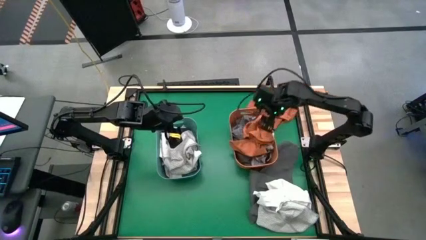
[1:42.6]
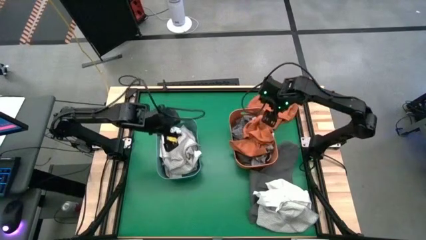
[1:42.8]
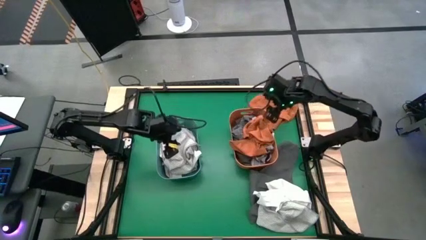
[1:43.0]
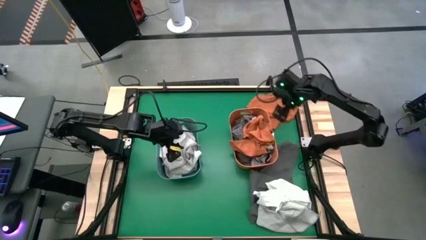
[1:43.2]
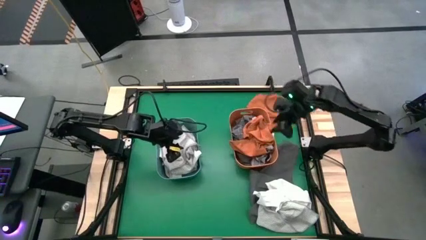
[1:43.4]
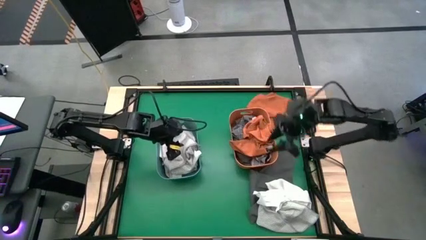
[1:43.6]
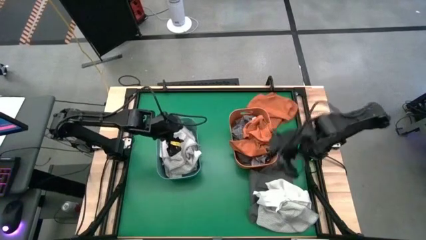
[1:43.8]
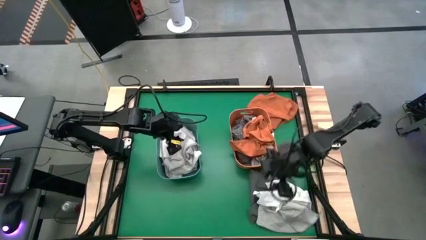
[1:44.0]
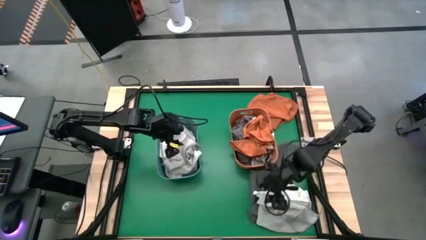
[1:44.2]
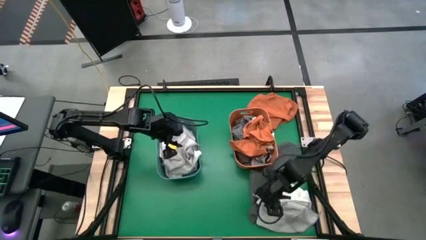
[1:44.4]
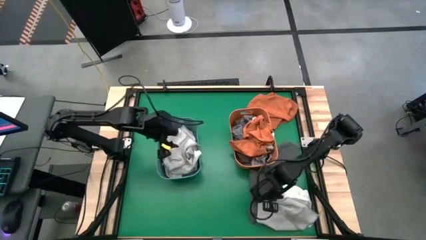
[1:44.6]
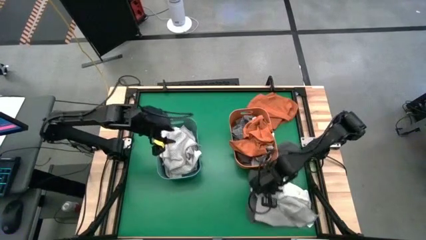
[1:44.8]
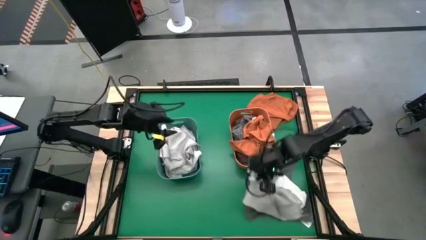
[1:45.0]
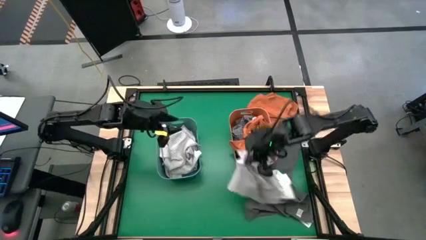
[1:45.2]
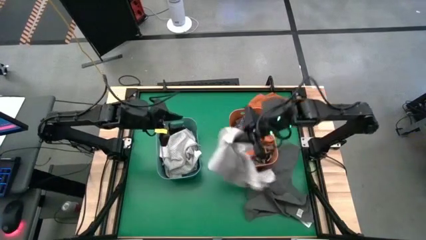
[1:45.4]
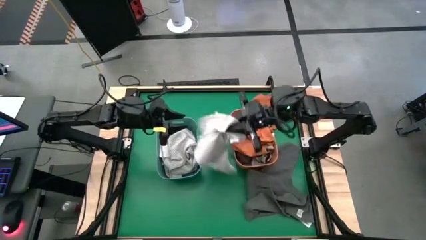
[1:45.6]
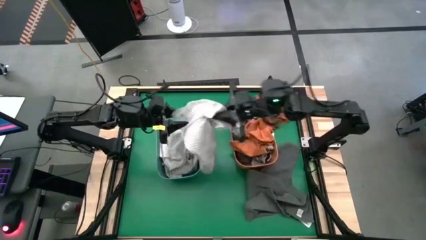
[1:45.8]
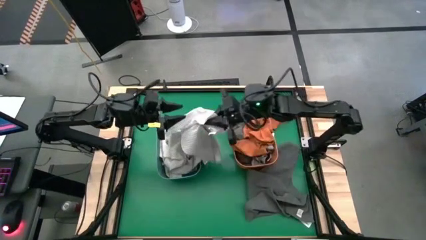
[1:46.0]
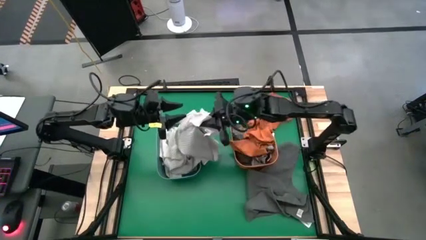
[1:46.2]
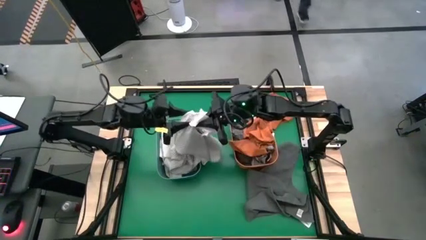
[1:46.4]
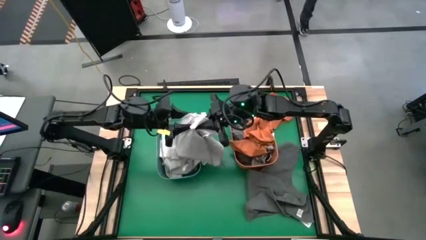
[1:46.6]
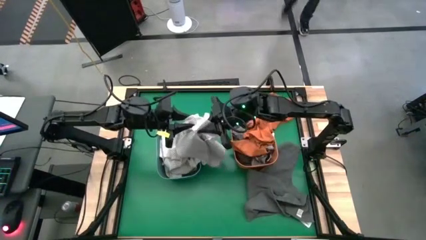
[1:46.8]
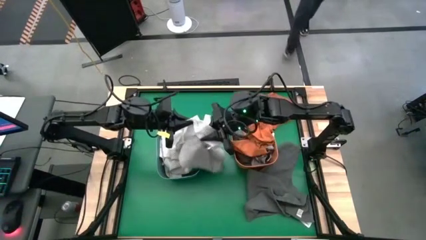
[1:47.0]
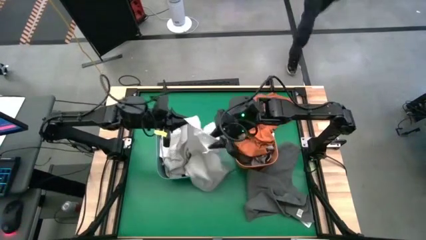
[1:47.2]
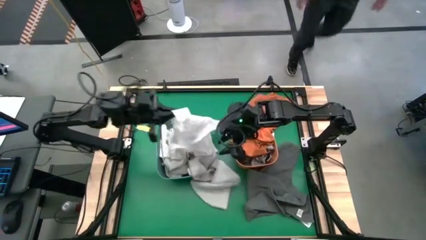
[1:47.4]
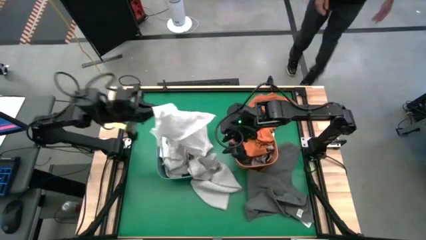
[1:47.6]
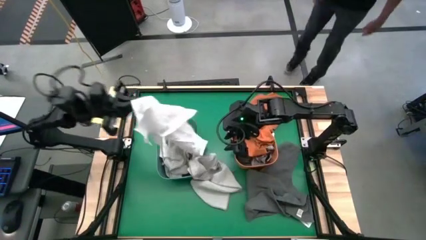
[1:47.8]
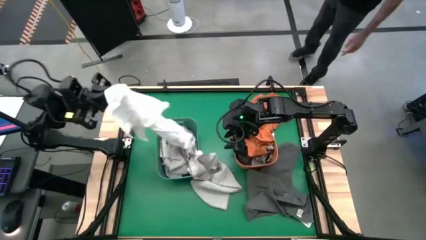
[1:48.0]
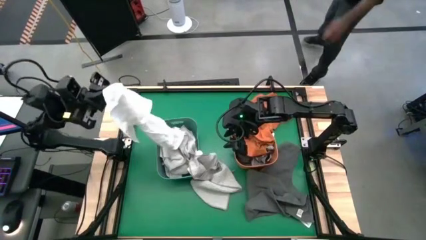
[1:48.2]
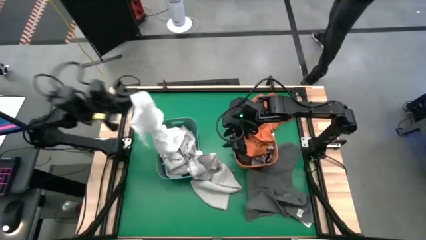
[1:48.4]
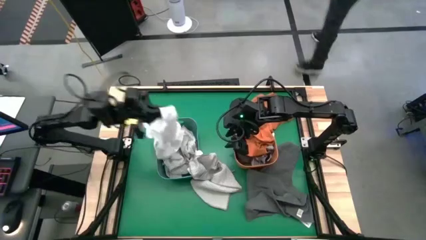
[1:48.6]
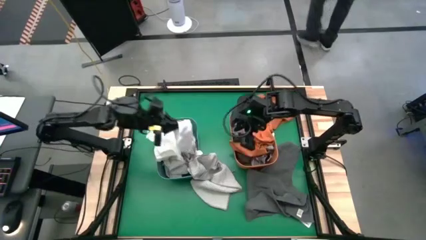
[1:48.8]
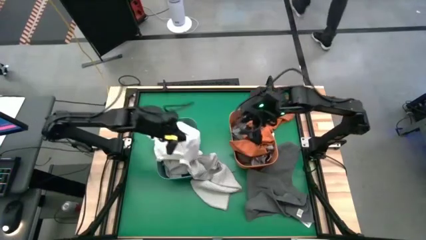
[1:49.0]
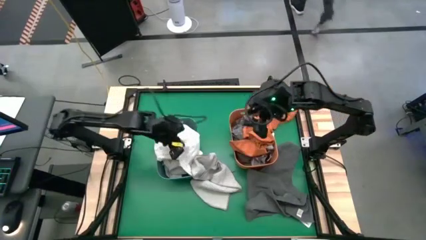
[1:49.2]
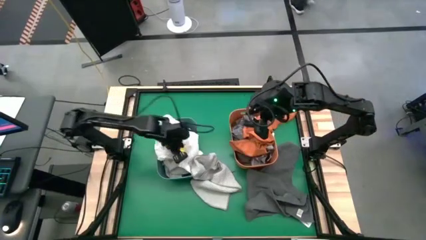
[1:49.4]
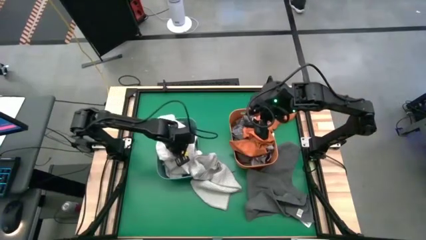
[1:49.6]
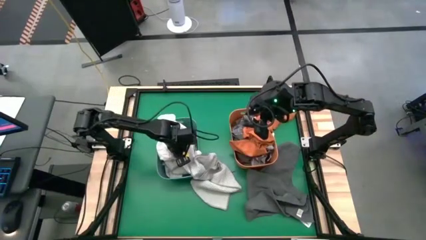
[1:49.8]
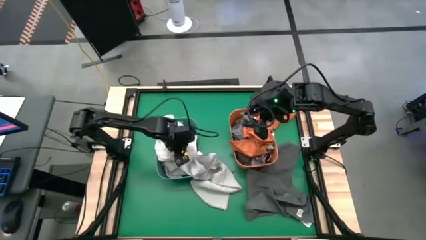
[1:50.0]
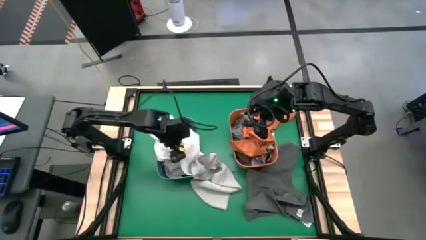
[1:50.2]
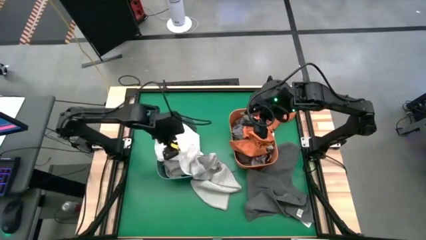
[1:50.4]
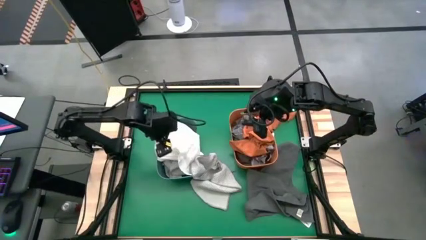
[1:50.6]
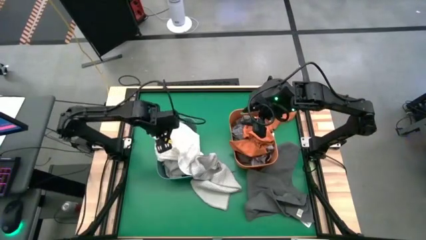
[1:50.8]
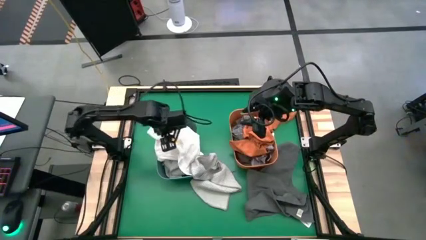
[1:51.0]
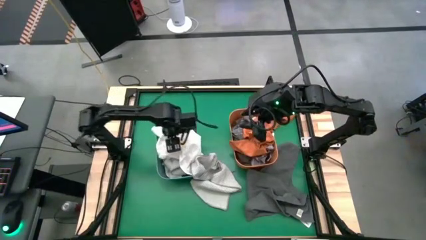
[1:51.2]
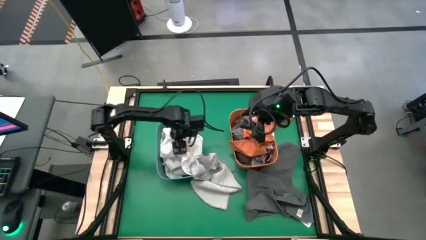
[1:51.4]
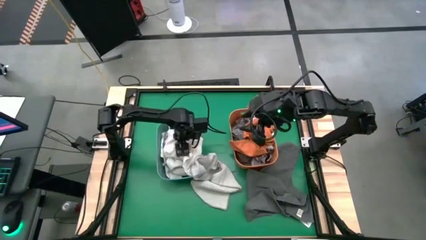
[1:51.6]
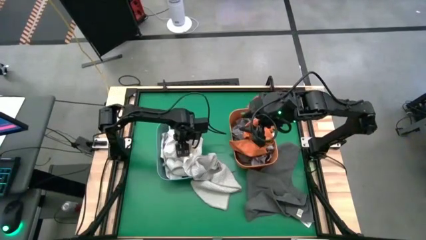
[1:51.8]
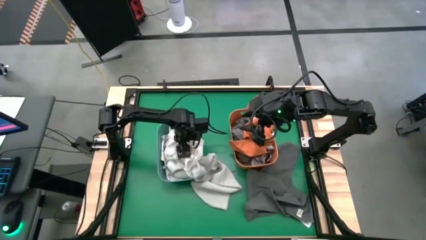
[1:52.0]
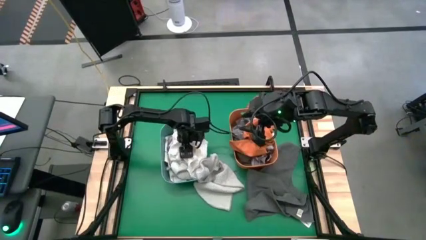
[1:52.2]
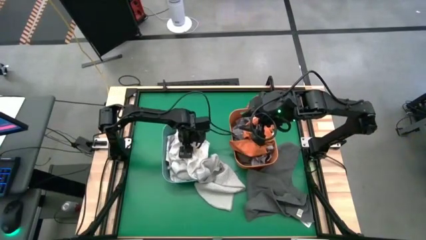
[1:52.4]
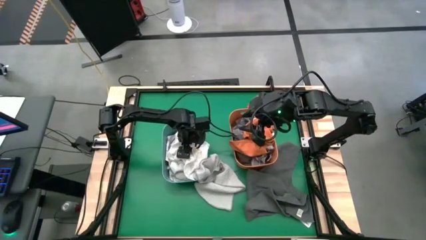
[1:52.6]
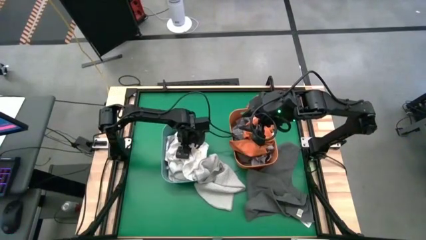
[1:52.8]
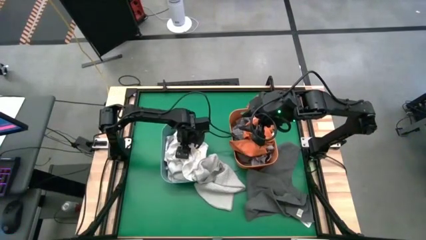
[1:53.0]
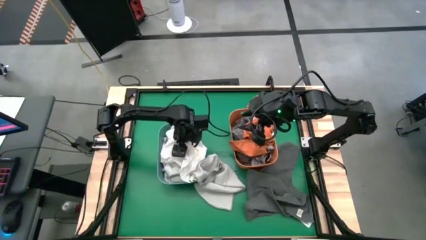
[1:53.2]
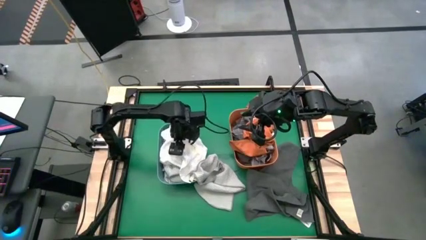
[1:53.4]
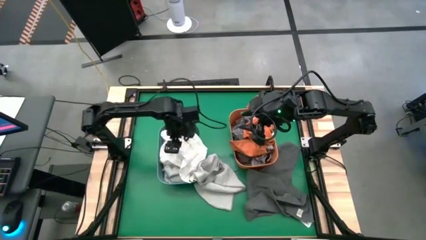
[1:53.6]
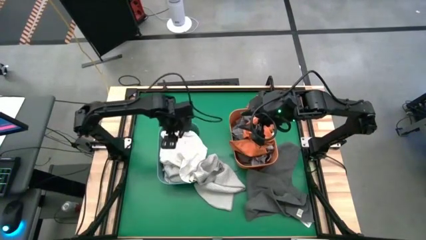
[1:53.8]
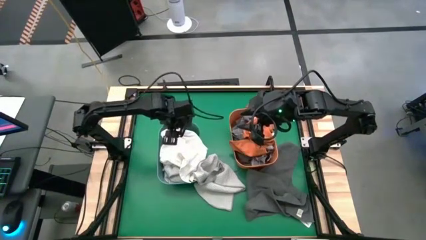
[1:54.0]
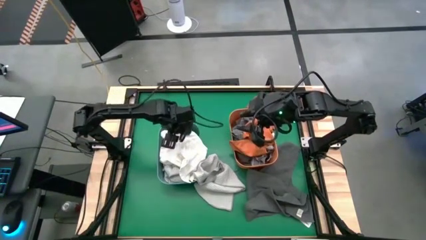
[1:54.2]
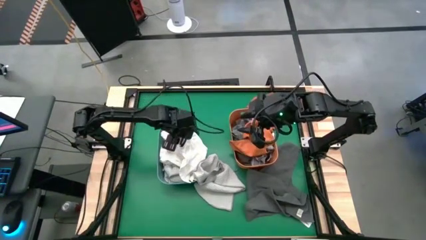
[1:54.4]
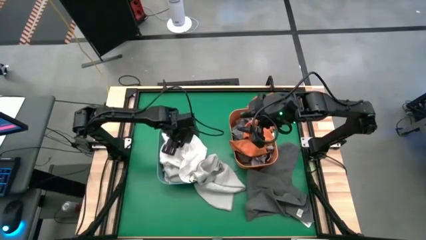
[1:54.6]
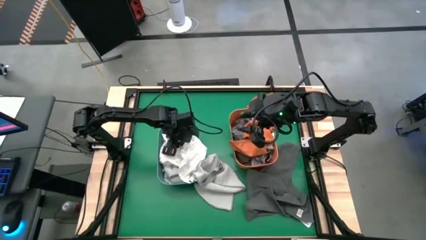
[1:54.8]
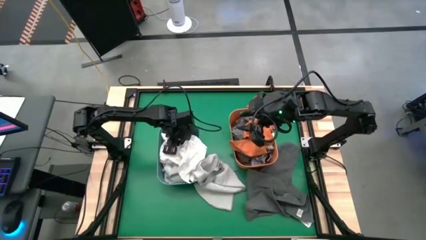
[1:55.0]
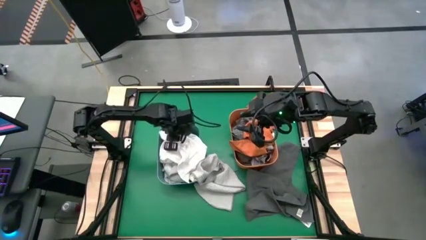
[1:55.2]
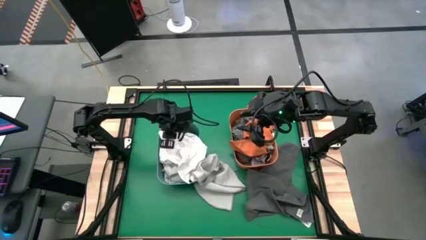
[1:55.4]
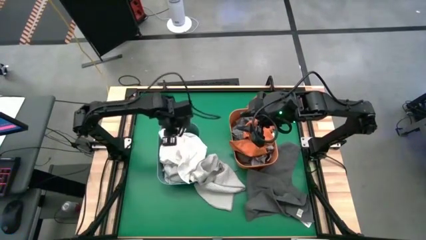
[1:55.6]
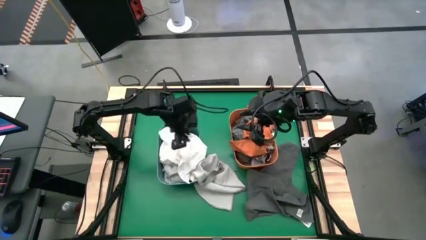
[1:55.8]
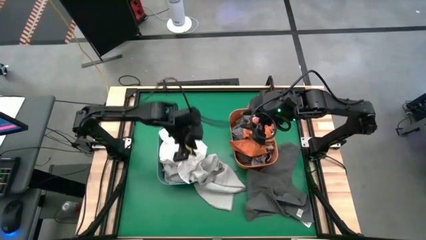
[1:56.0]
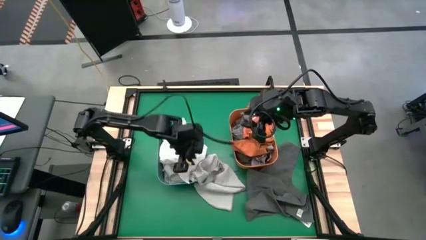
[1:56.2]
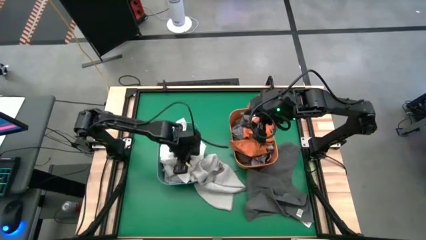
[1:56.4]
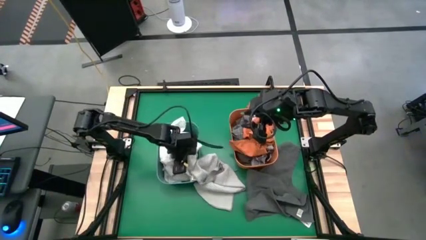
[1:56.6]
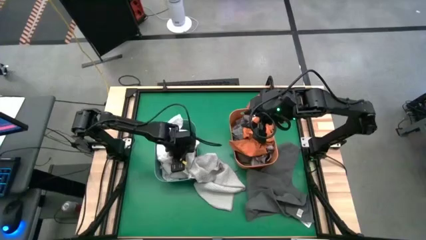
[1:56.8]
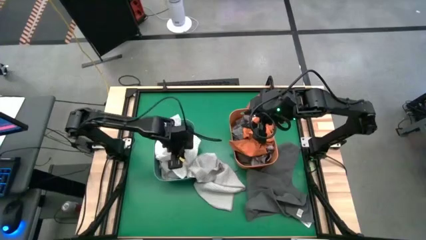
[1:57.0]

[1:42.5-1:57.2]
Task: Sort towels by color in basket
Put the white towel into the green bin

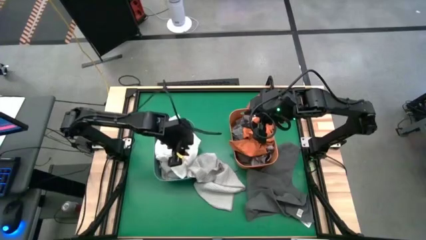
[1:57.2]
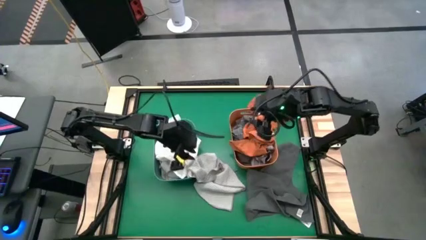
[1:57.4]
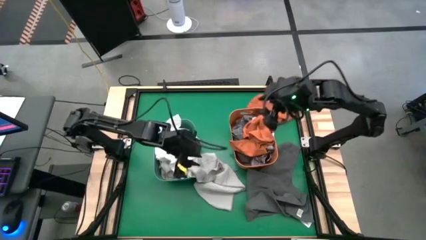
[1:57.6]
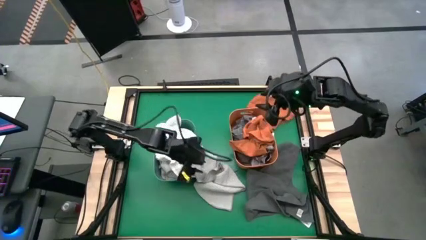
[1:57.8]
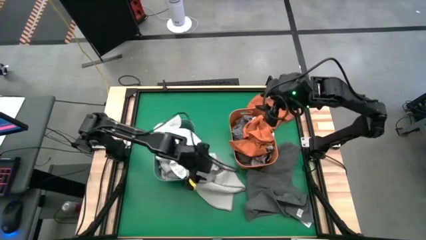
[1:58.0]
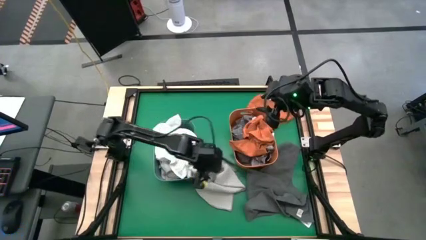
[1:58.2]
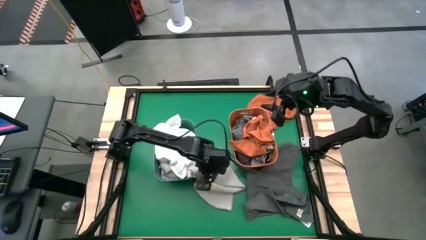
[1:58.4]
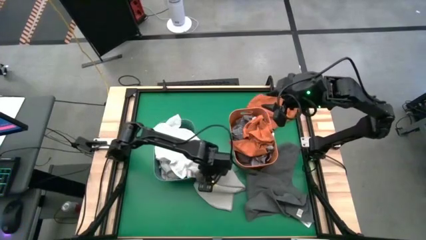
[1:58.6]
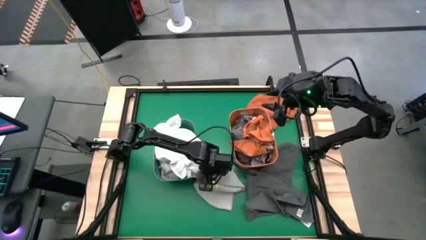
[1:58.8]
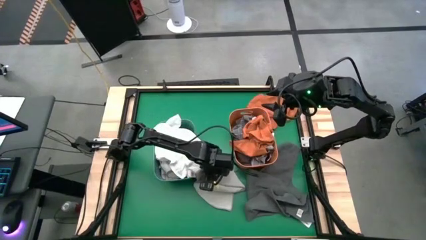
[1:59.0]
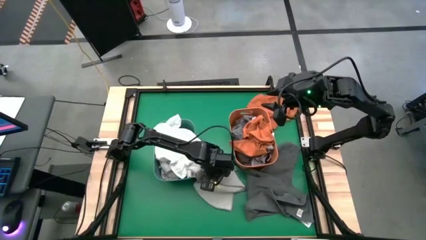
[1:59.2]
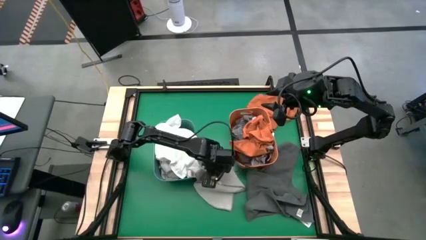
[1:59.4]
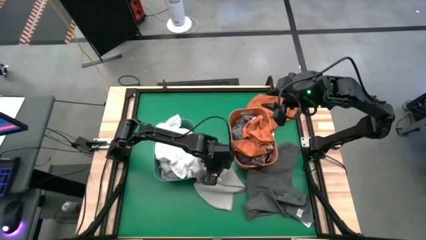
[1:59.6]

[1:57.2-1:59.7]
Put the gray towel into the green bin

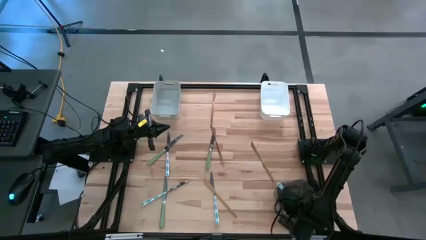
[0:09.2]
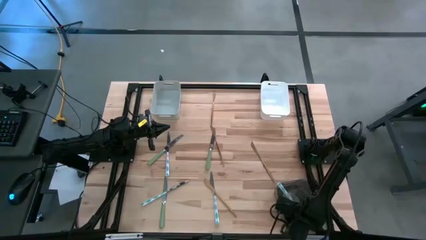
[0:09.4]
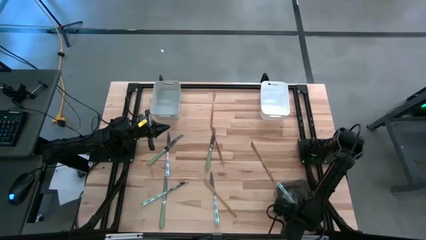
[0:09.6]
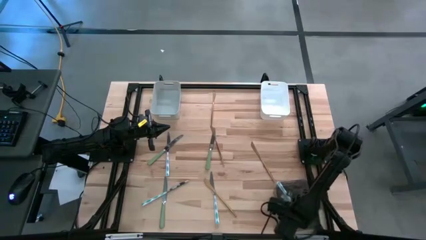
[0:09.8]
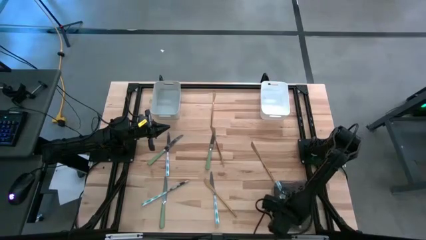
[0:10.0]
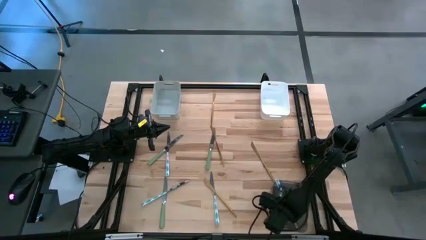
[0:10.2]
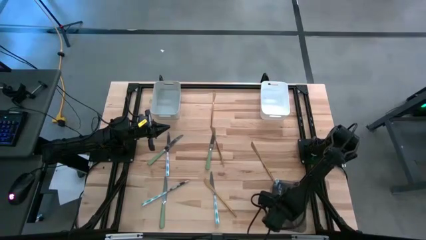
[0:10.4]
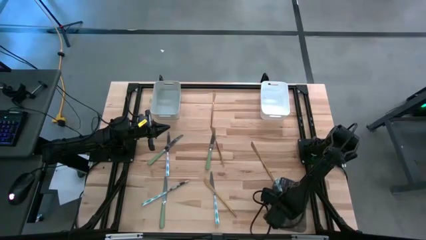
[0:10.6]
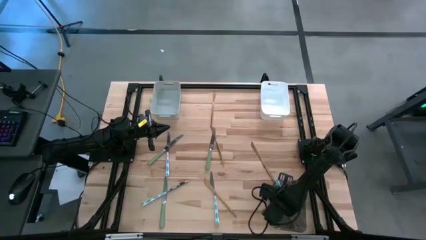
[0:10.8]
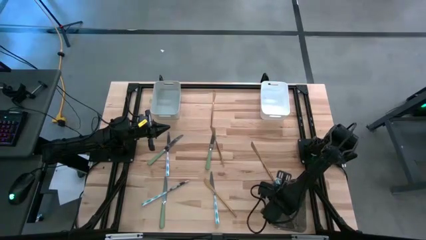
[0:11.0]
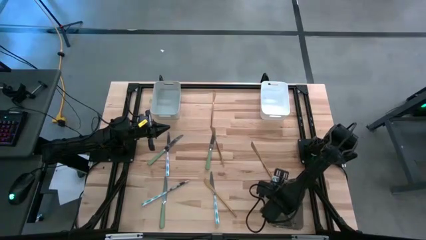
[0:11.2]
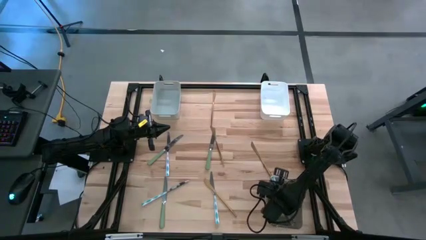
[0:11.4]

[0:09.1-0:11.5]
Task: Sort silverware by color (type)
Adjust the black bin
